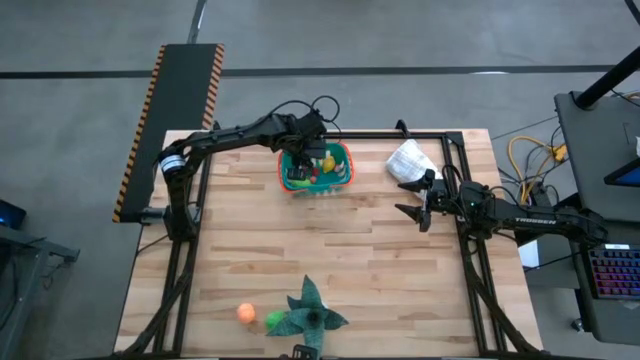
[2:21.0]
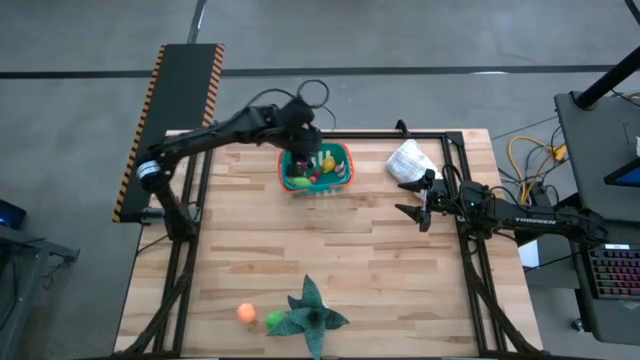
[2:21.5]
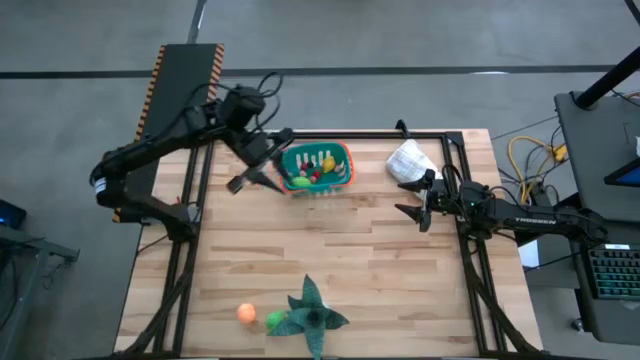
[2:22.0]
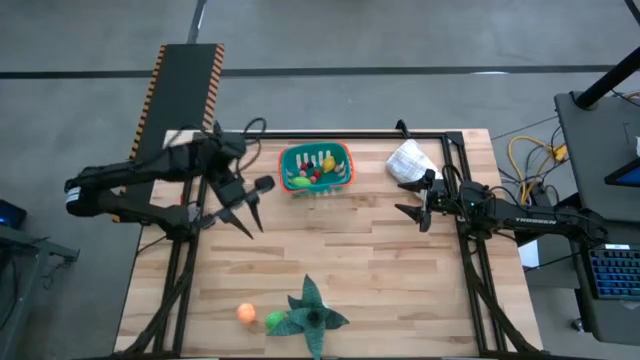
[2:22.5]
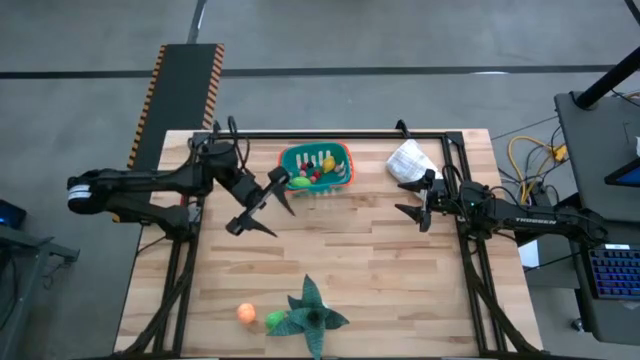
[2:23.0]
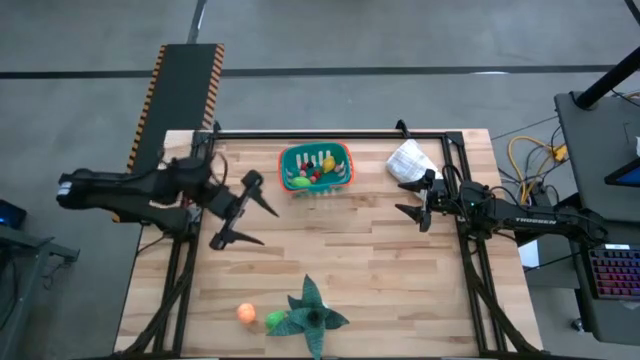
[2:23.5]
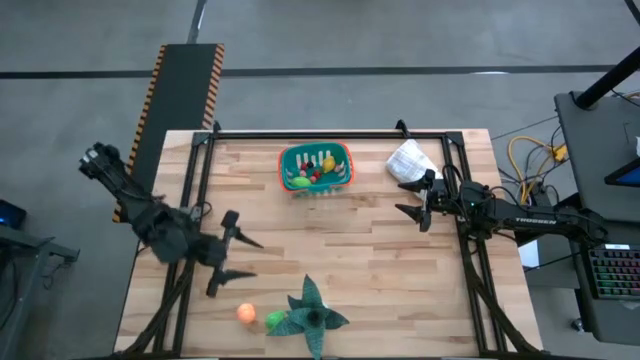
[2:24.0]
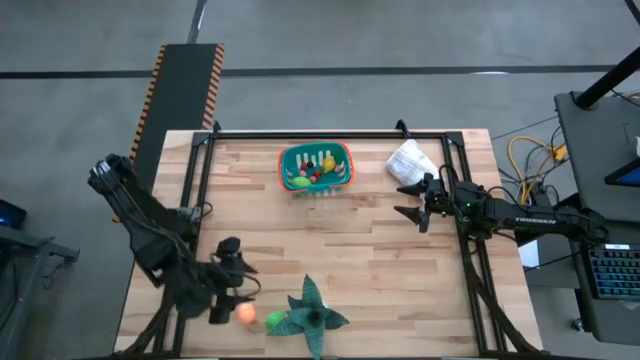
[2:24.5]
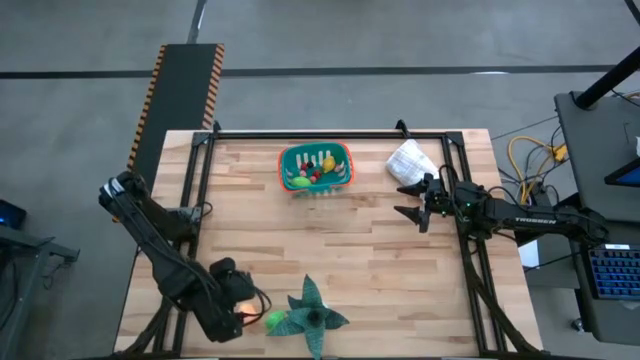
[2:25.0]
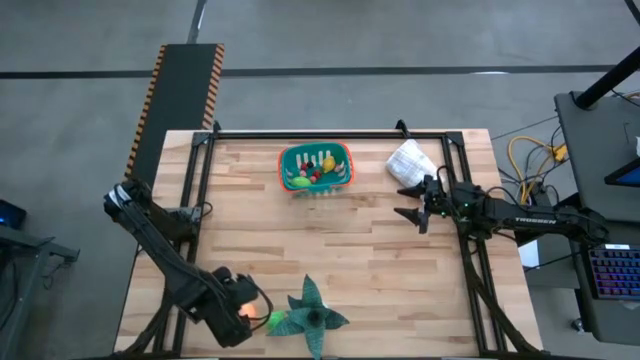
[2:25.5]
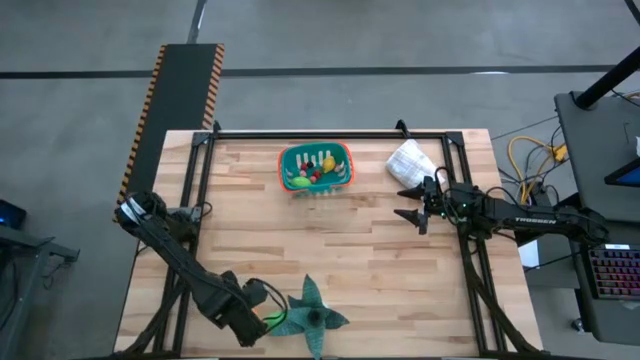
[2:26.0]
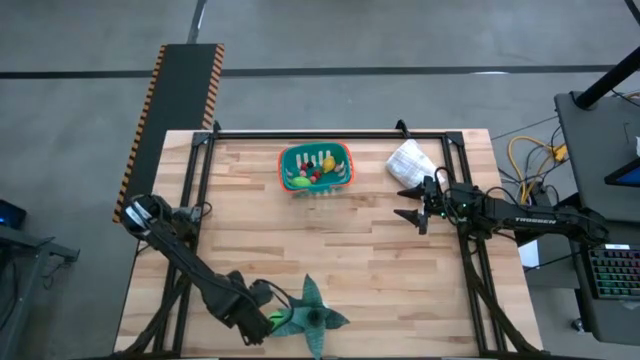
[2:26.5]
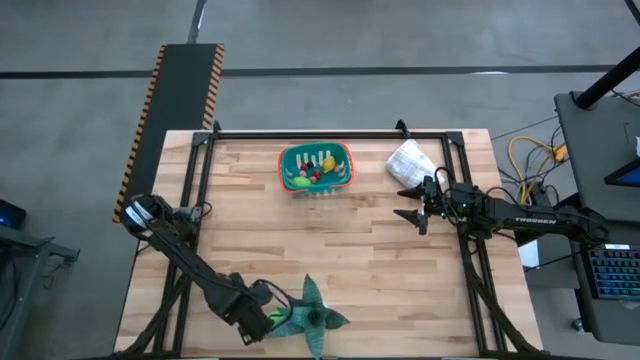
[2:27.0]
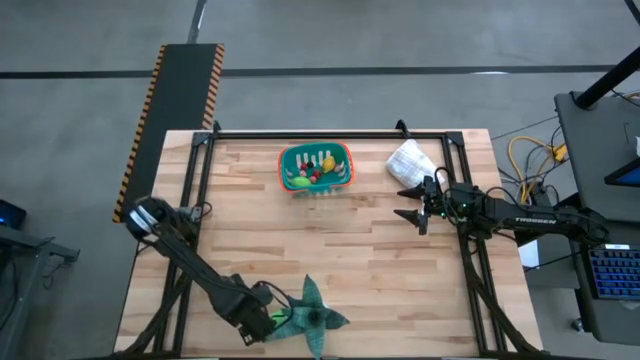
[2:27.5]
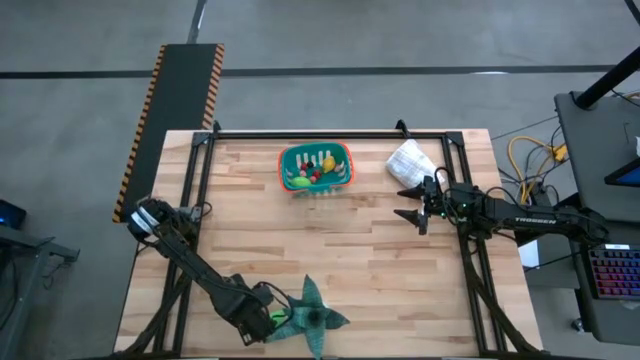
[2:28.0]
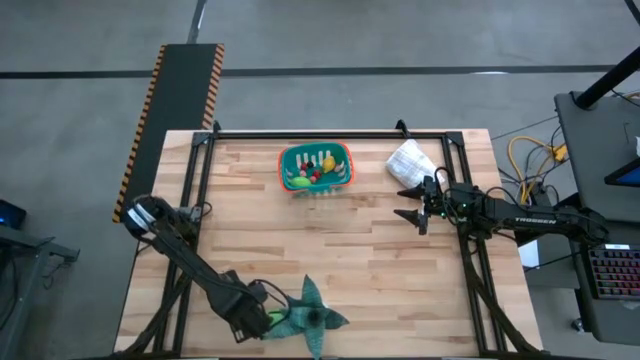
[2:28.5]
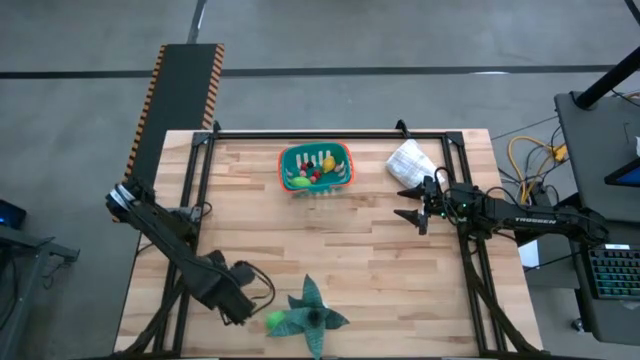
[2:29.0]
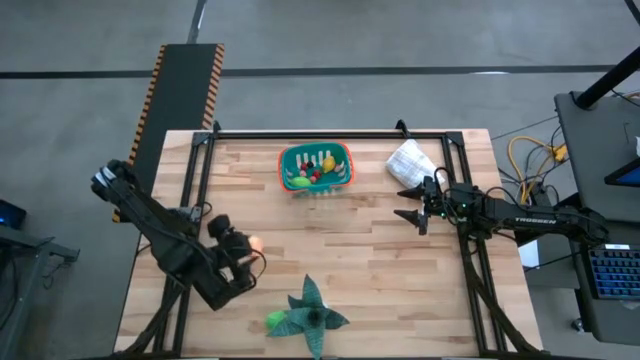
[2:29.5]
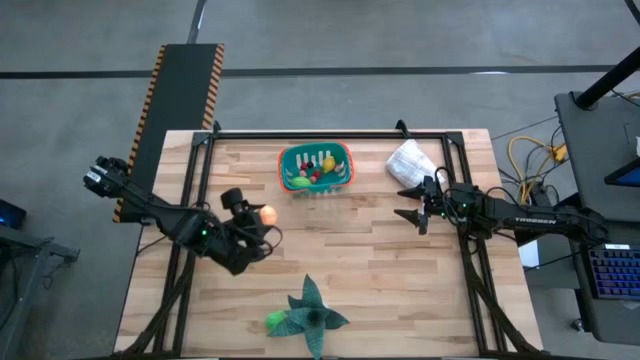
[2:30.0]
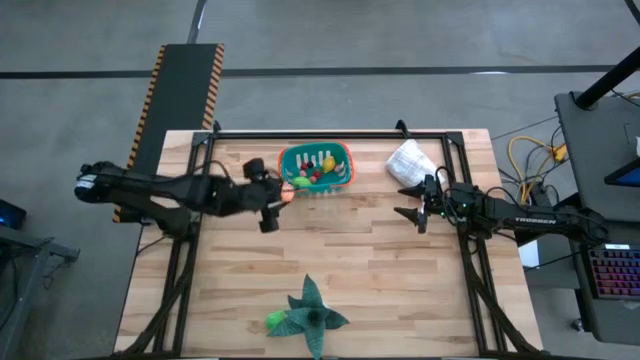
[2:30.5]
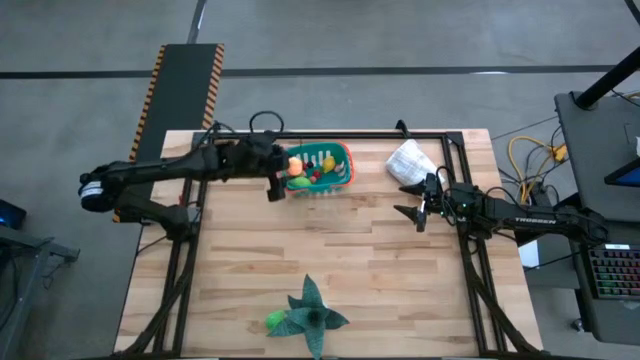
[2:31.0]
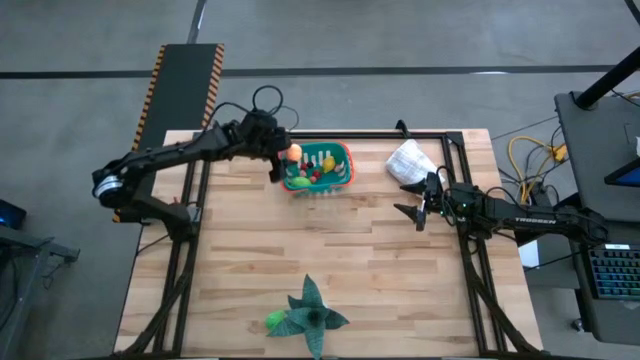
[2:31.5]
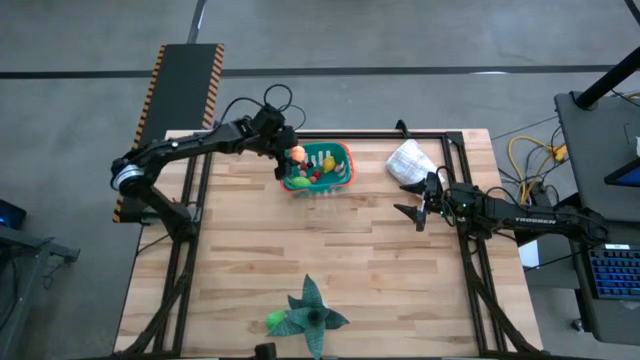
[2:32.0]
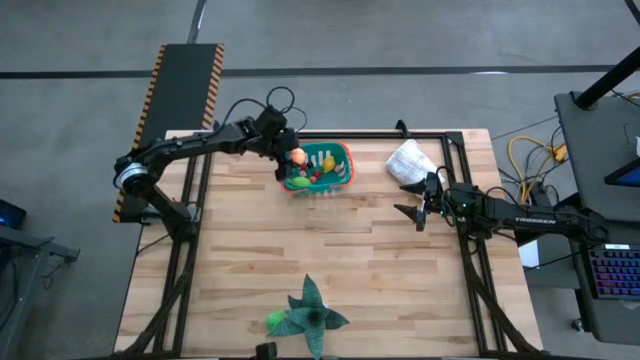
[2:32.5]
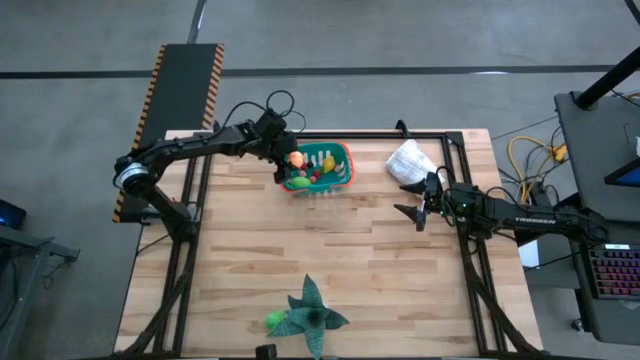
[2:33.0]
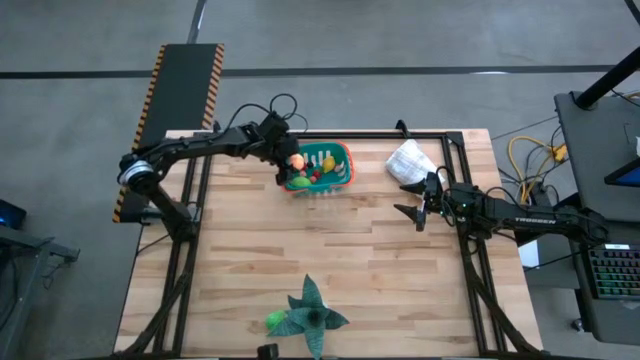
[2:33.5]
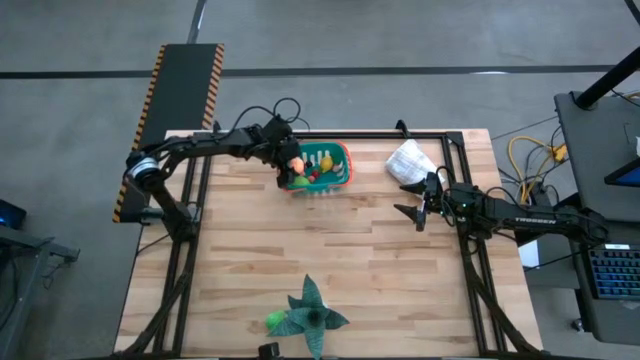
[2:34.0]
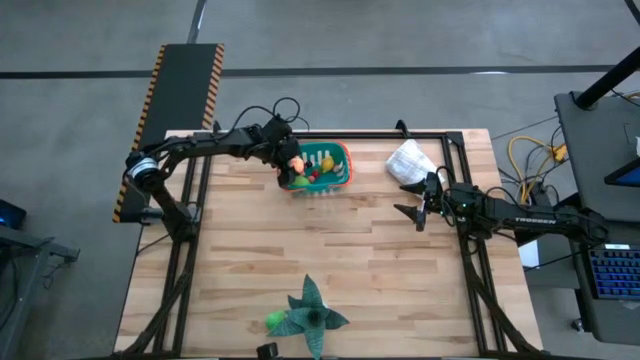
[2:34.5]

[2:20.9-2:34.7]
Task: Pick and placing Produce into tupperware
Put the peach toy in the bin

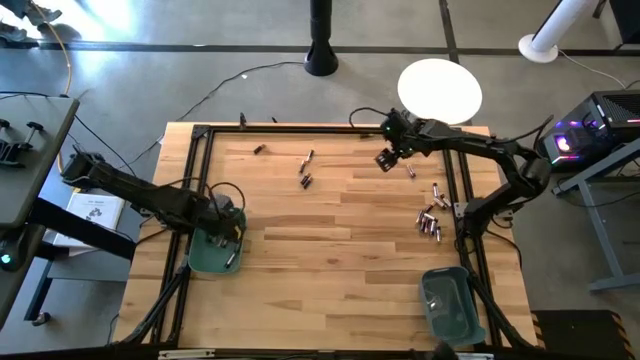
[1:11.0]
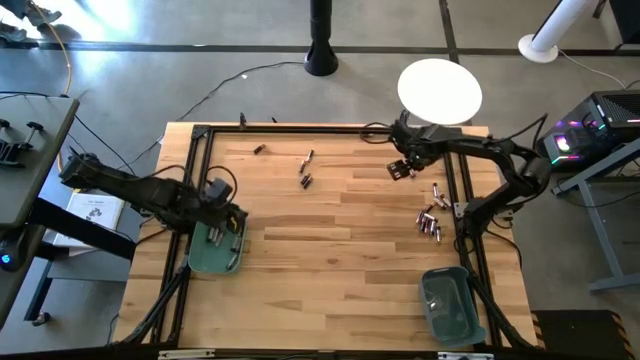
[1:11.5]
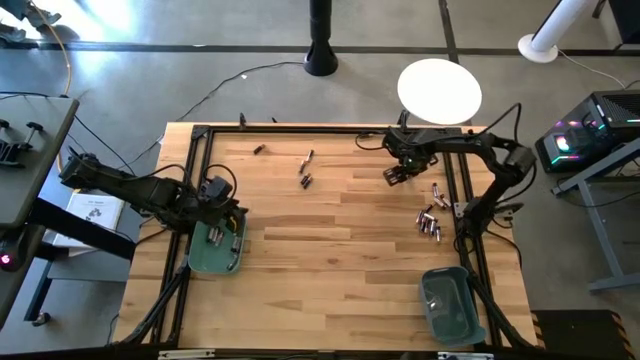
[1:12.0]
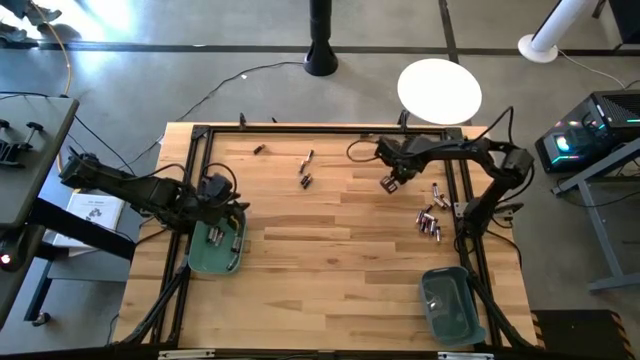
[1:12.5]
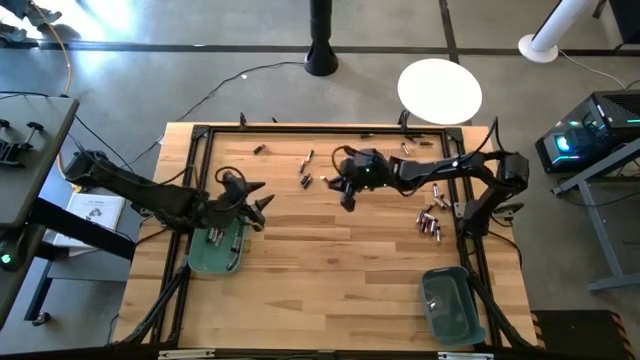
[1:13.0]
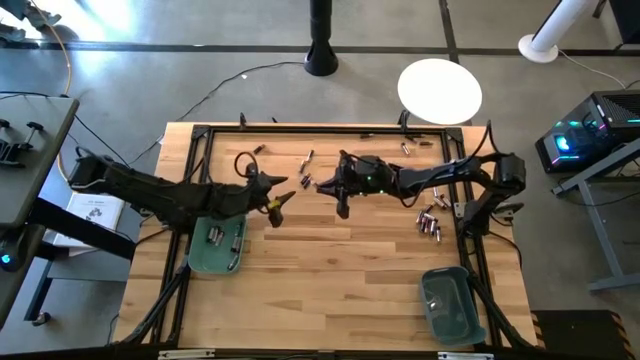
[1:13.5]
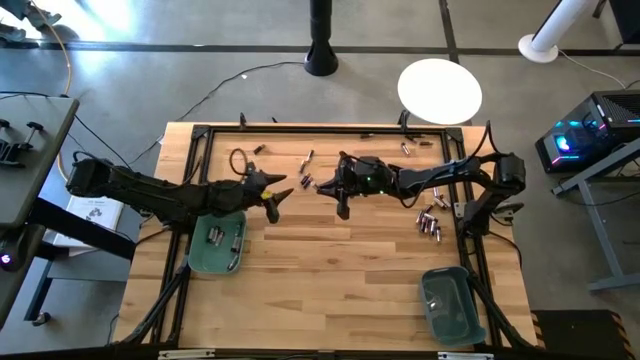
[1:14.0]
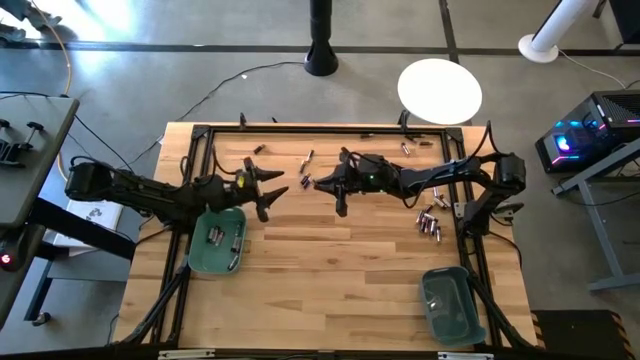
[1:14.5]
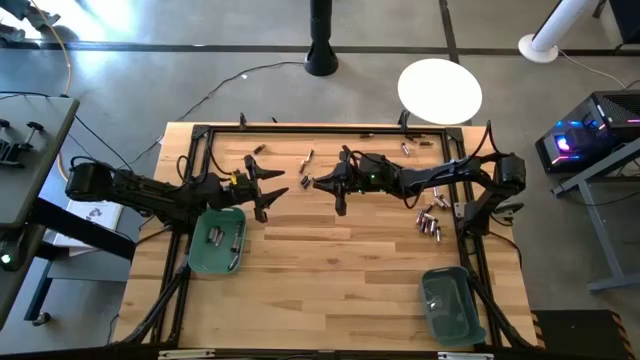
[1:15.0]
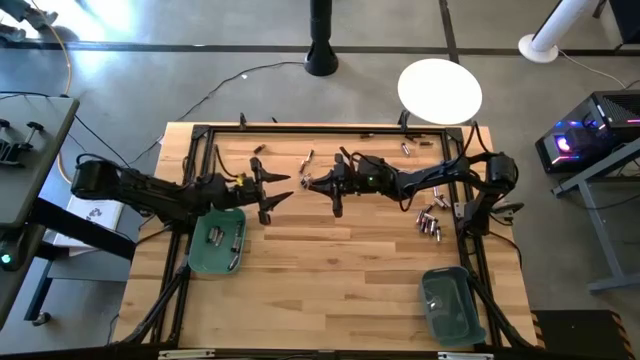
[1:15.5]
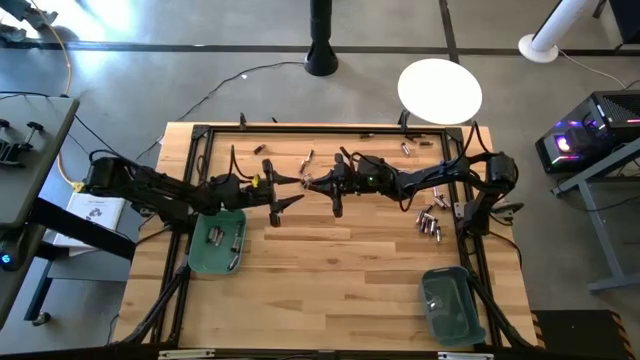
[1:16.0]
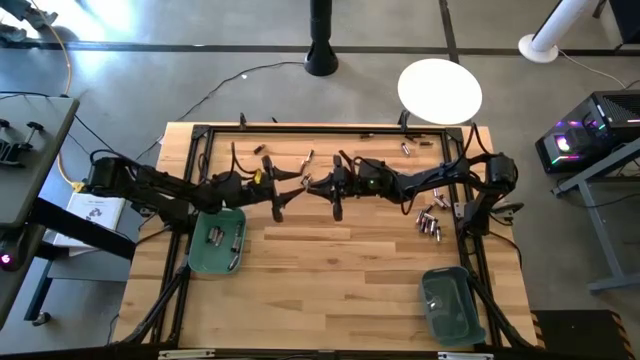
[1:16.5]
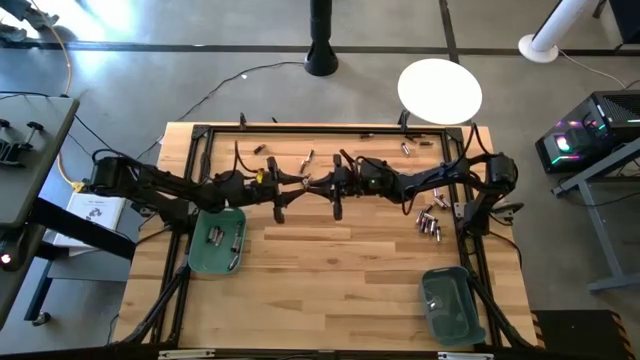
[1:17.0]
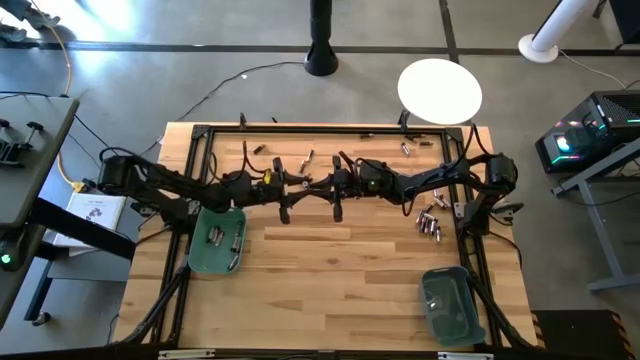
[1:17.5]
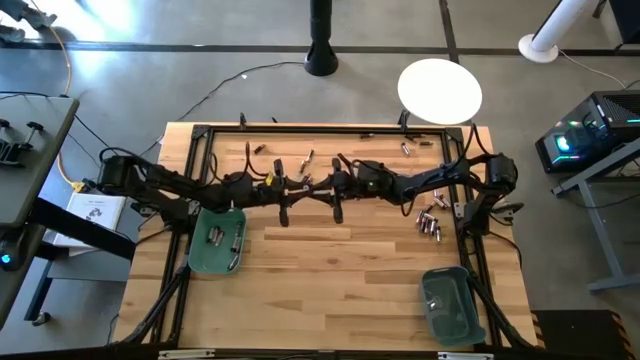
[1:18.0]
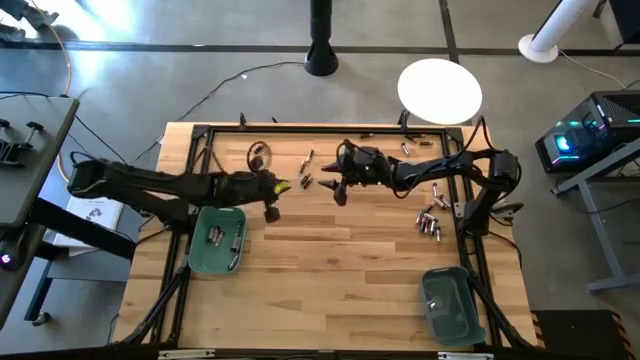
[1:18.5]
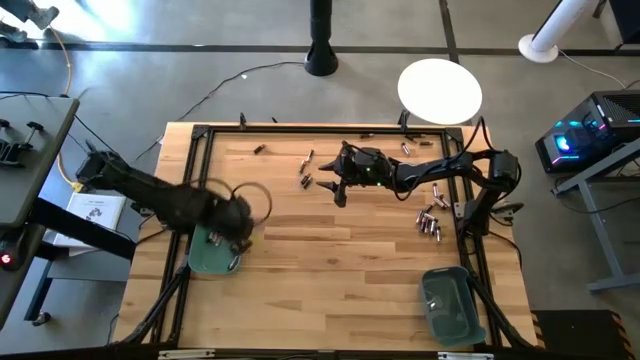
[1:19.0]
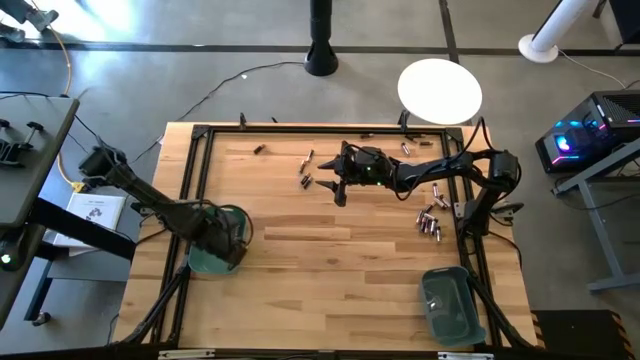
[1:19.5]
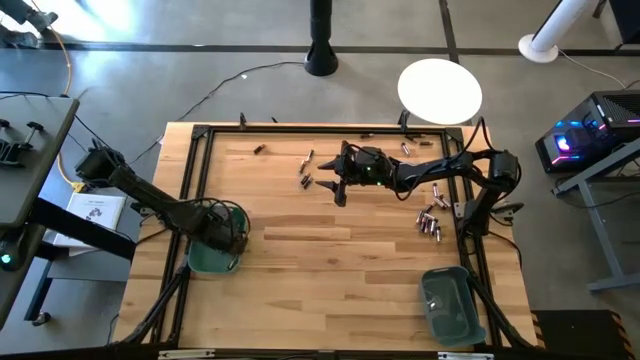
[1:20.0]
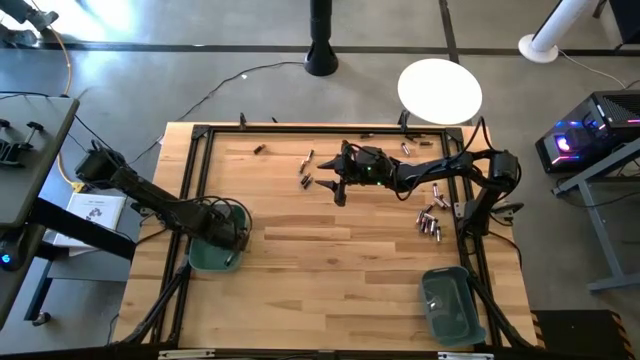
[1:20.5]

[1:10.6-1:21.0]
Task: Sort batteries
Put the silver battery into the green bin
